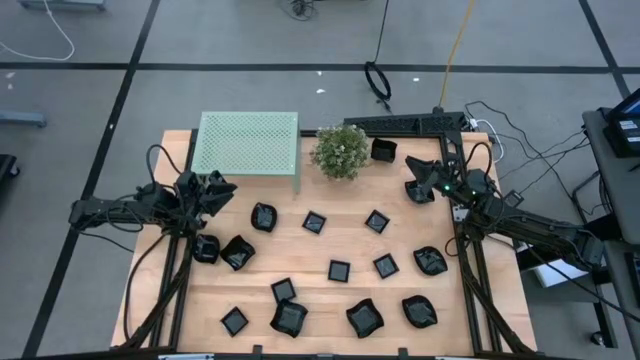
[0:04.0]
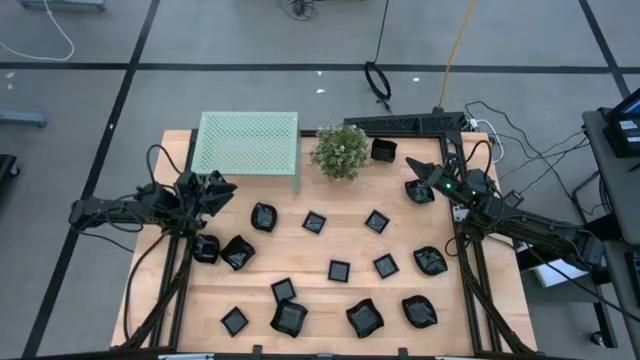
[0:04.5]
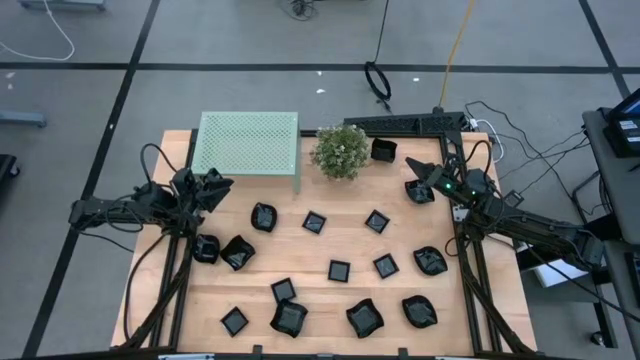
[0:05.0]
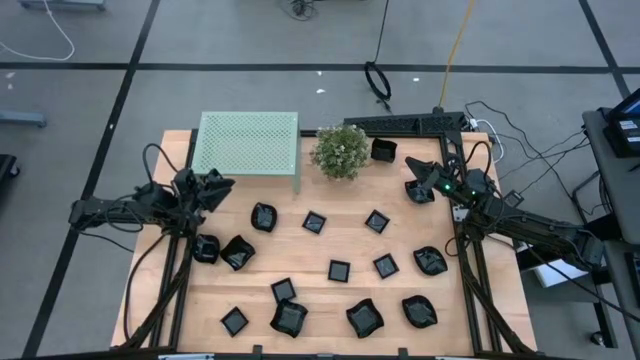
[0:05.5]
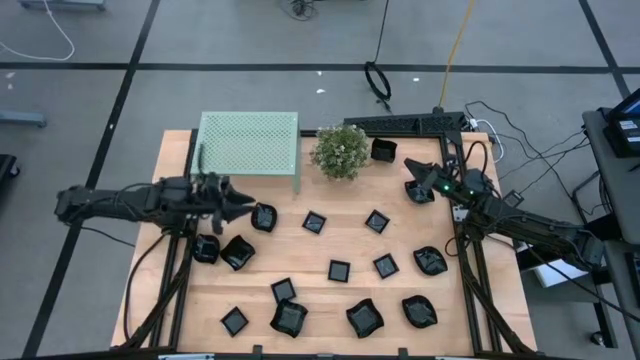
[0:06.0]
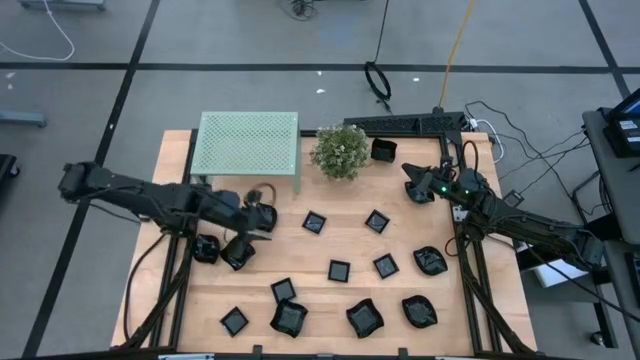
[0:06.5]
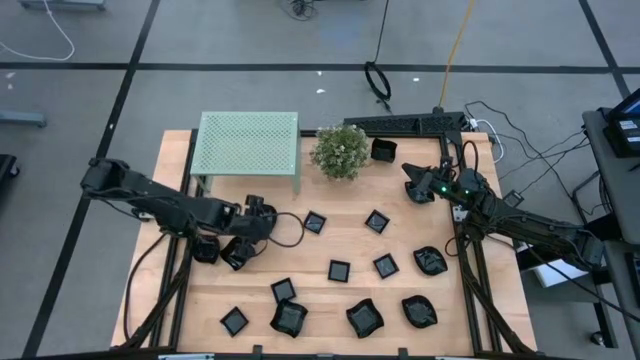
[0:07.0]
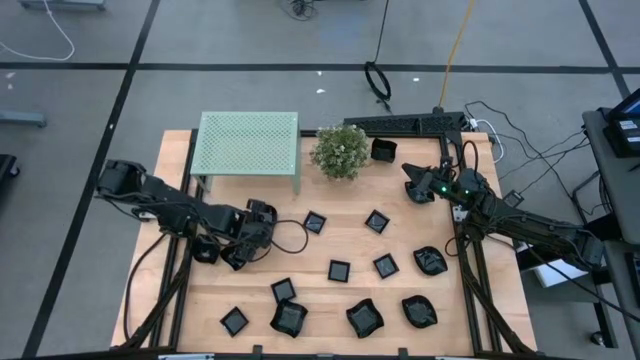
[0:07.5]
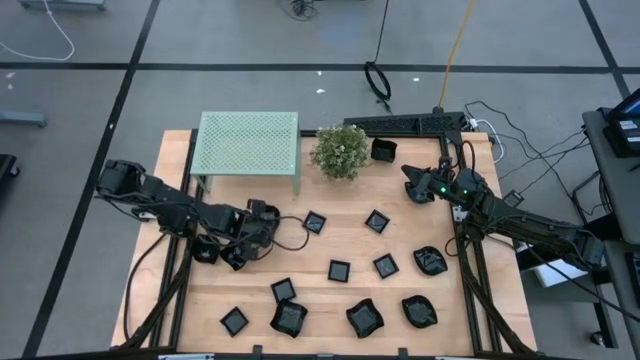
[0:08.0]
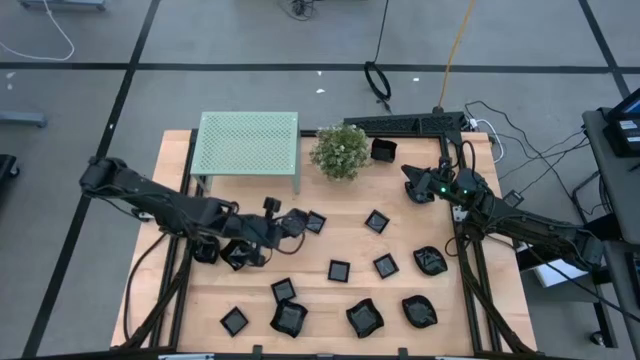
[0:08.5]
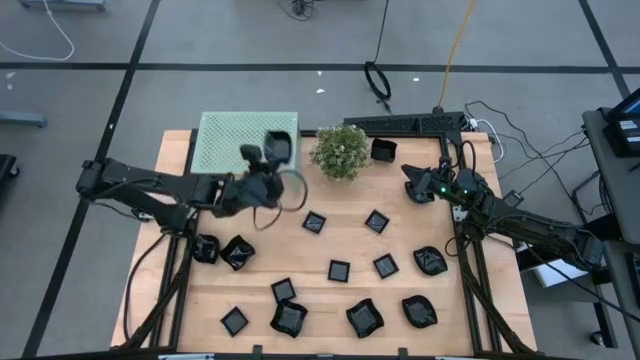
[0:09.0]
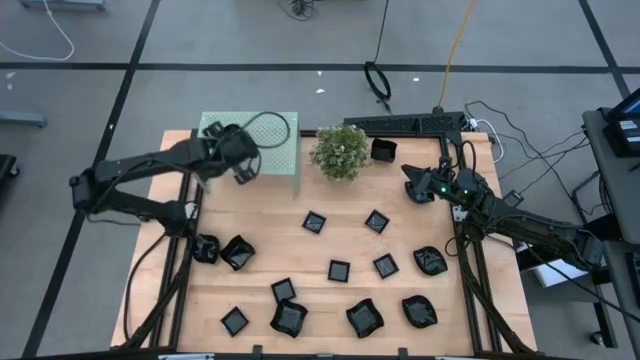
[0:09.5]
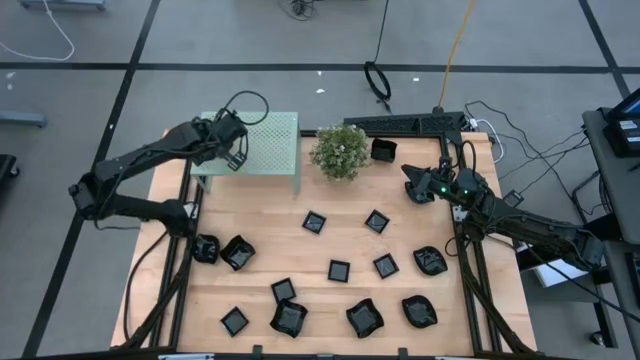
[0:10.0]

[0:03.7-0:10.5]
Task: Pick & Place Mini shaped plates
Put the leaf shape plate on the shelf

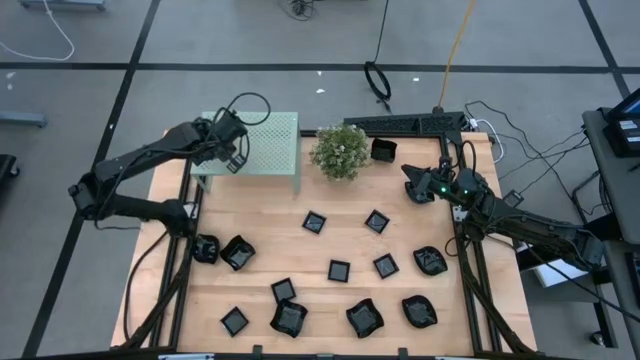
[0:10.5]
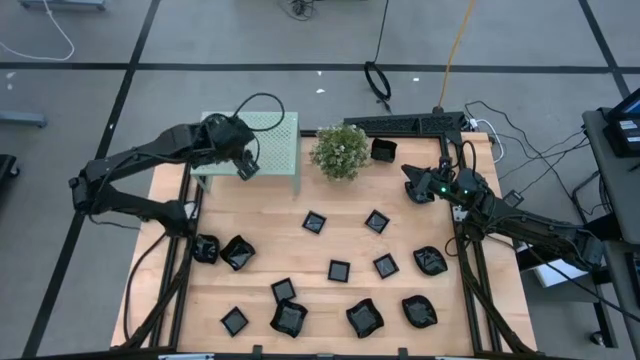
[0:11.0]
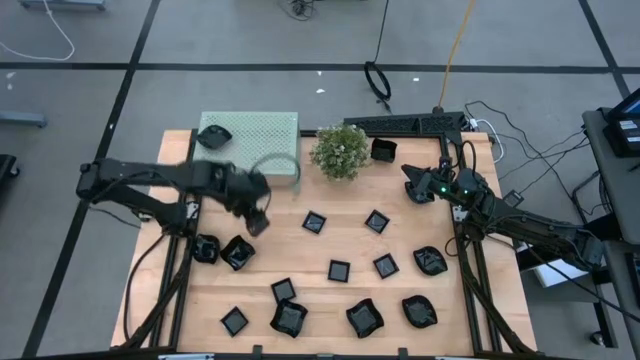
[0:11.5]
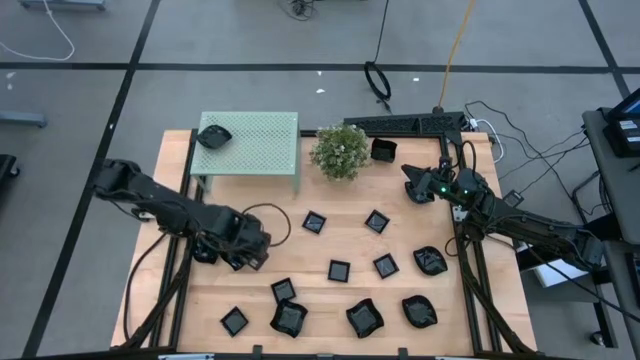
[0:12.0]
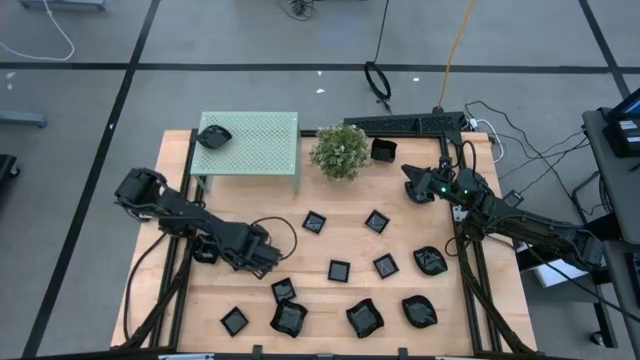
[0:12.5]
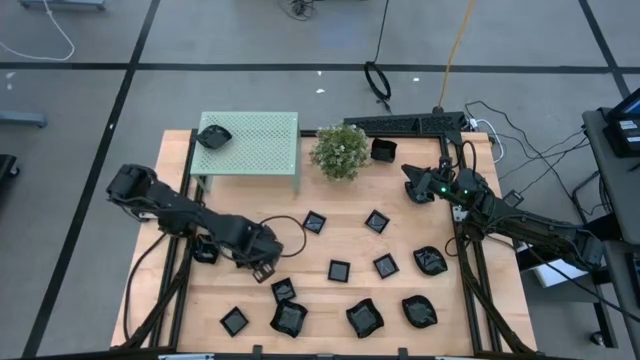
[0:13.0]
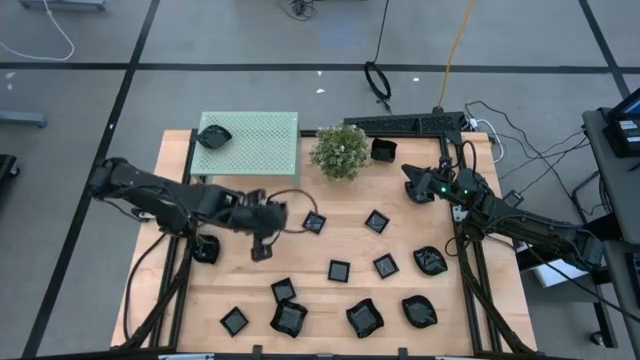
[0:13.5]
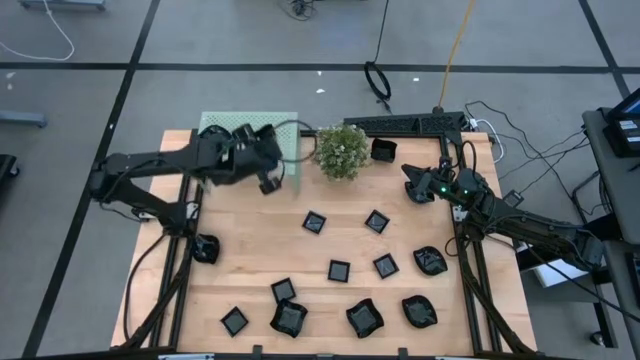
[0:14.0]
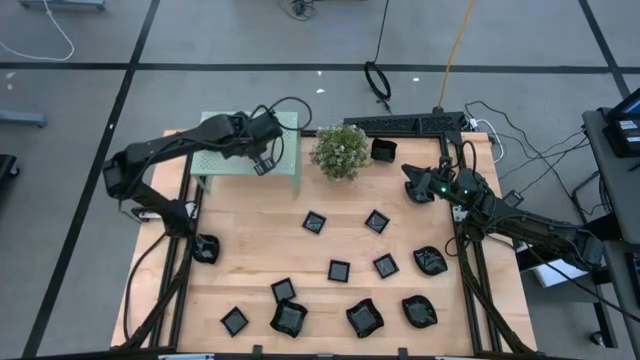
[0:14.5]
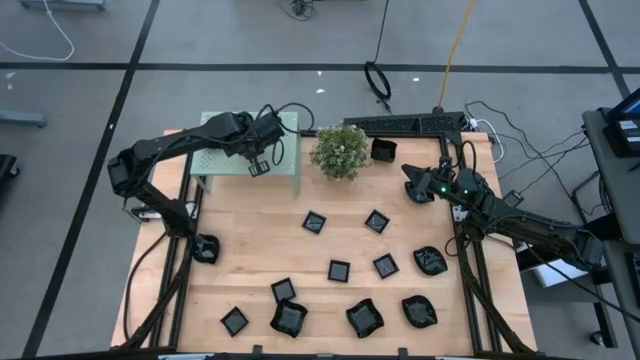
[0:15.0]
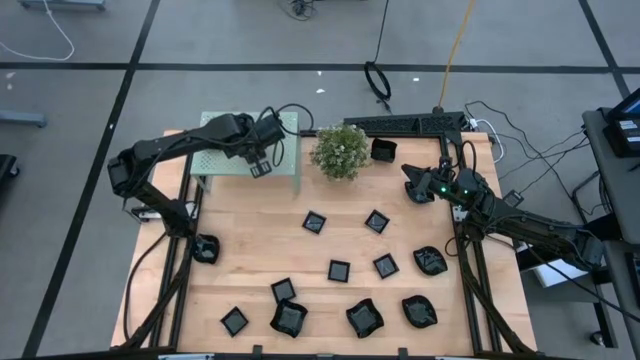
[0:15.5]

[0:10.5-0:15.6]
Put the distorted square plate on the shelf

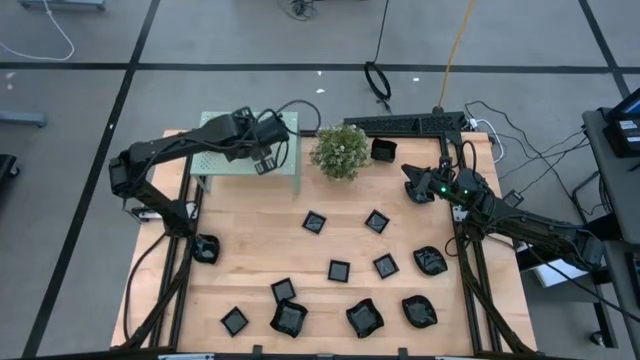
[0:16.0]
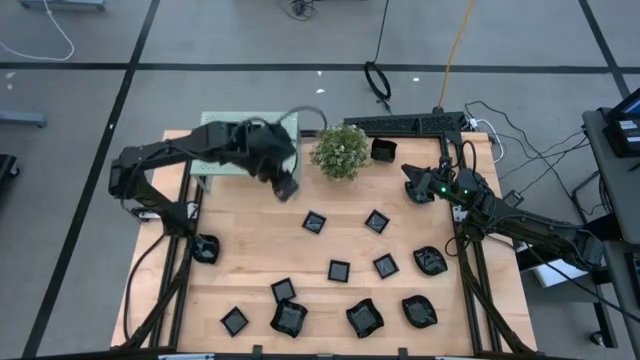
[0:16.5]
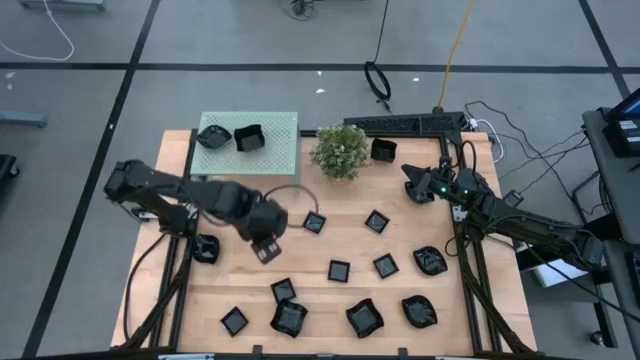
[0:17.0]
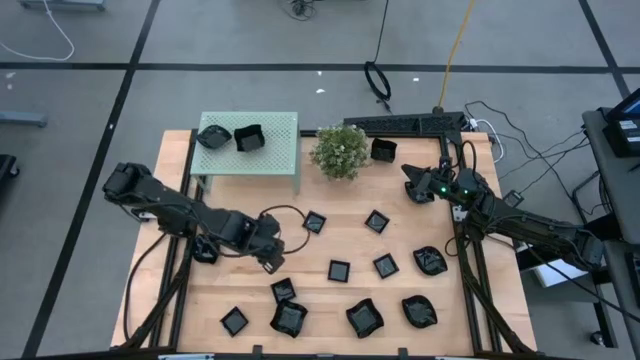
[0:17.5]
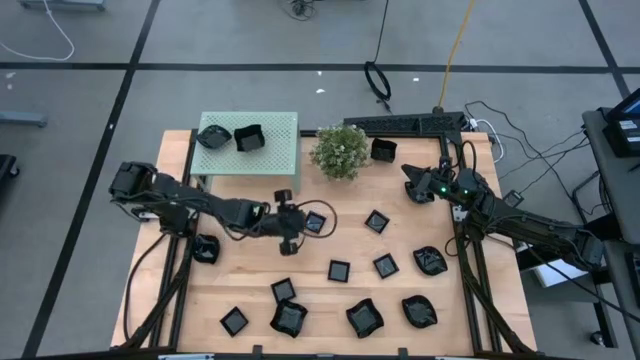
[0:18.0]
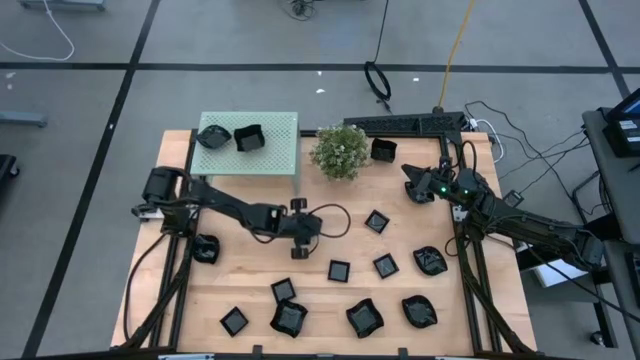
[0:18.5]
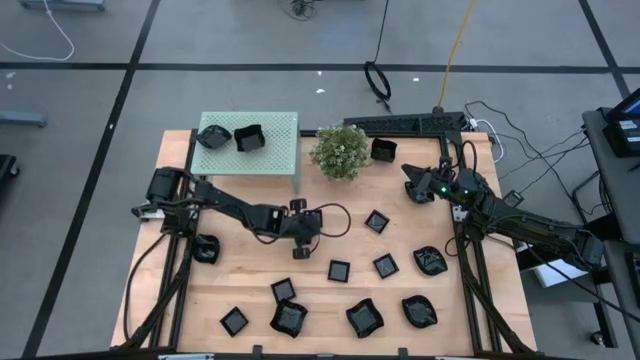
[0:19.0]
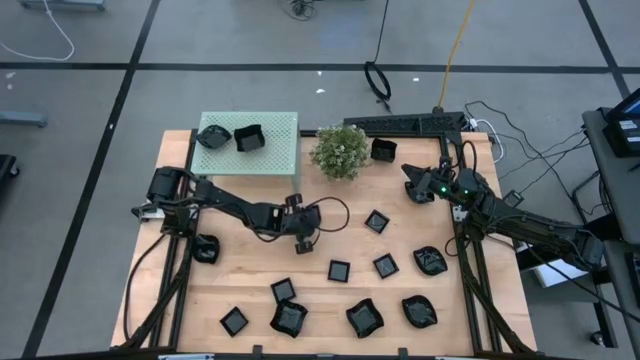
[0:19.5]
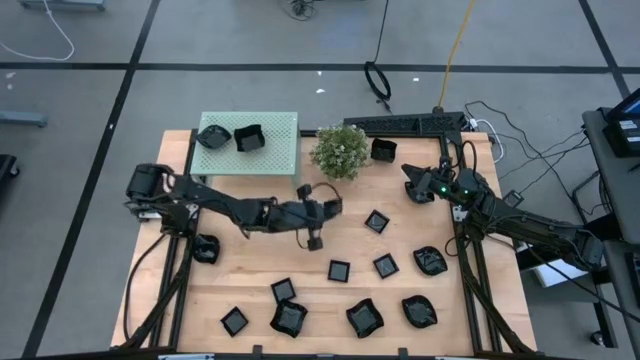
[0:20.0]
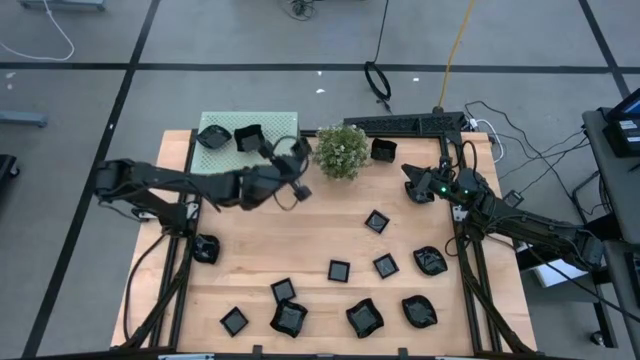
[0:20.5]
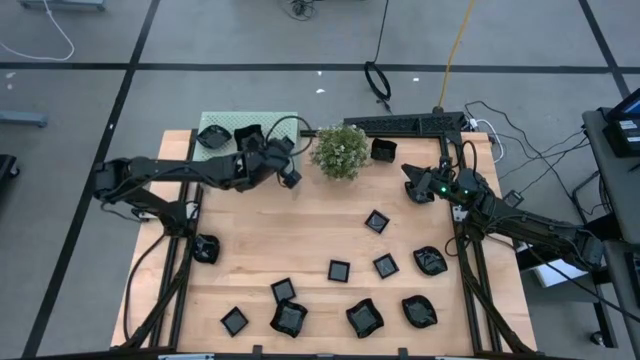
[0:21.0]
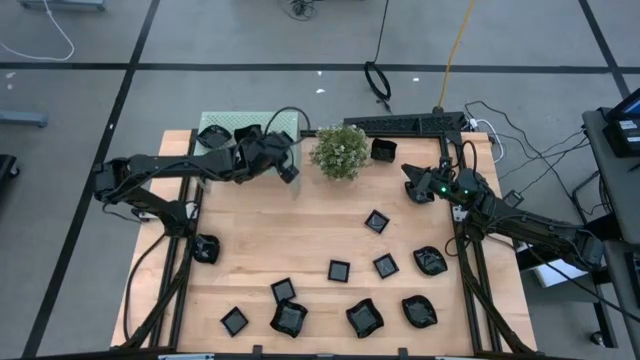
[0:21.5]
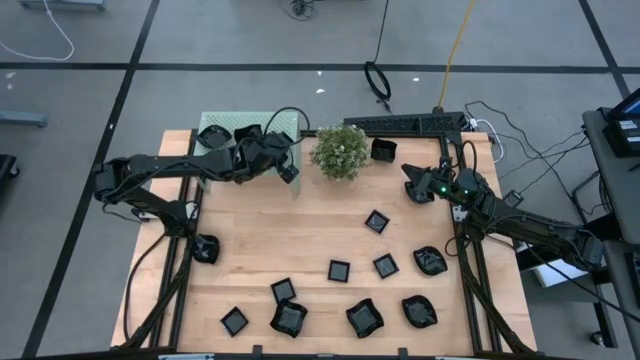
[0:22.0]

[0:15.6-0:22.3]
Put the square plate on the shelf

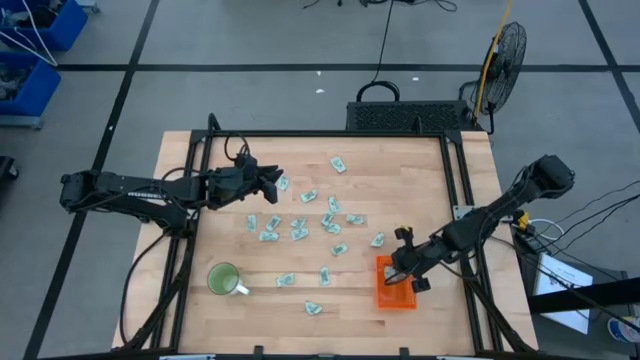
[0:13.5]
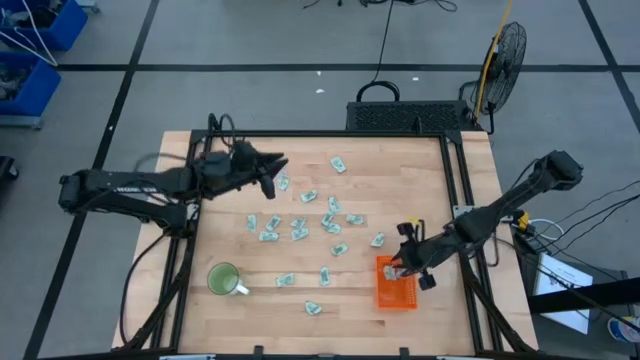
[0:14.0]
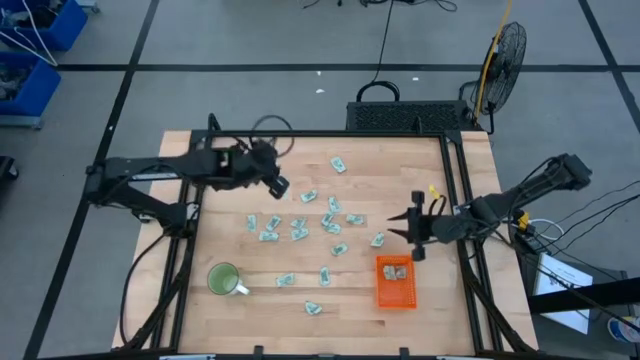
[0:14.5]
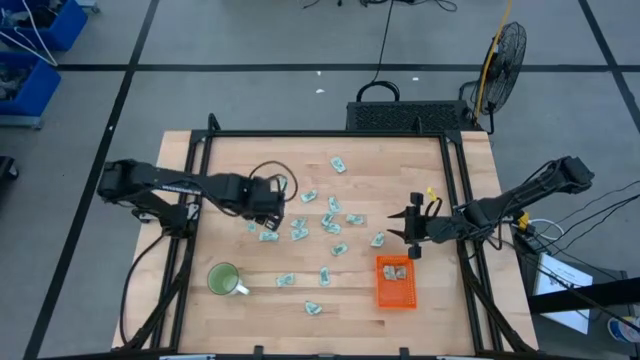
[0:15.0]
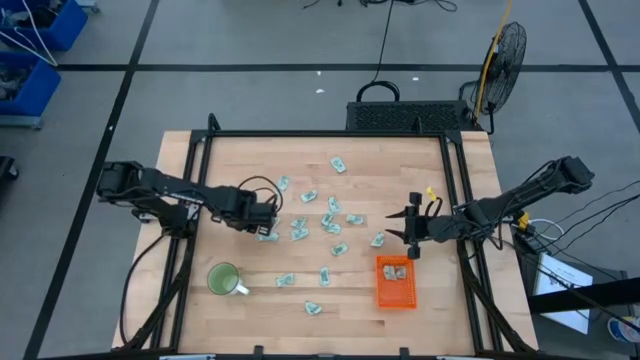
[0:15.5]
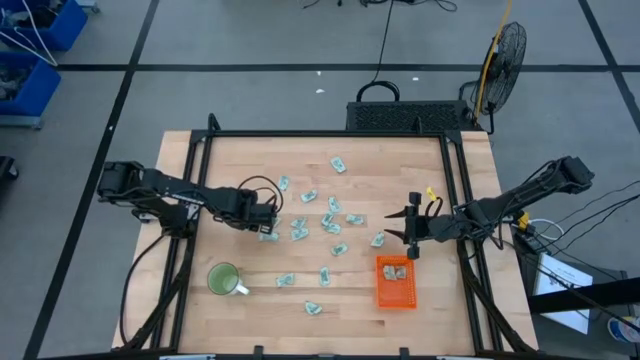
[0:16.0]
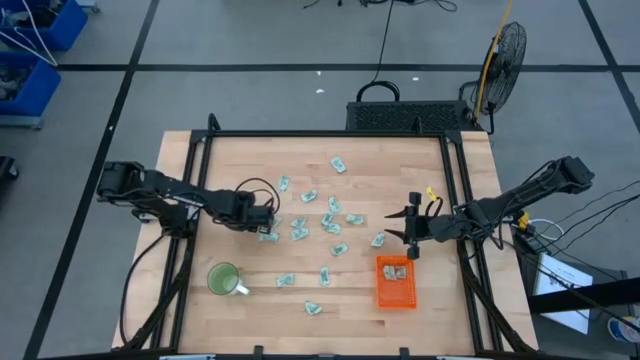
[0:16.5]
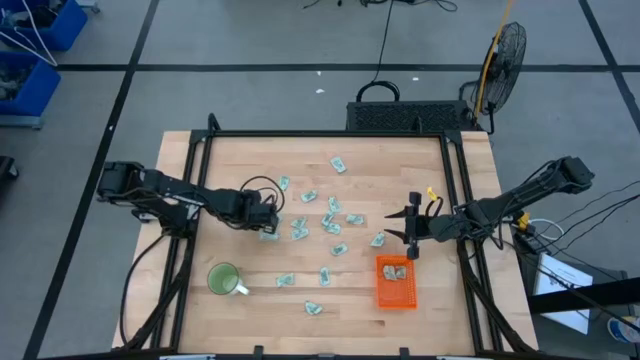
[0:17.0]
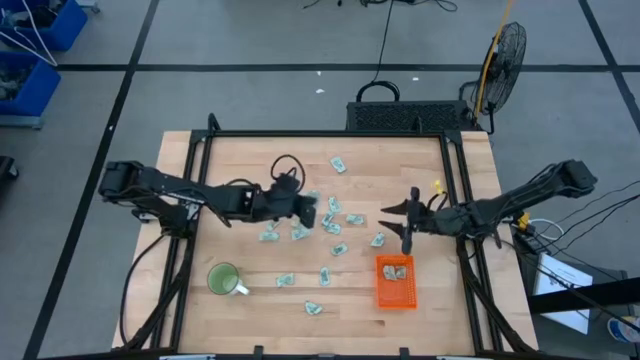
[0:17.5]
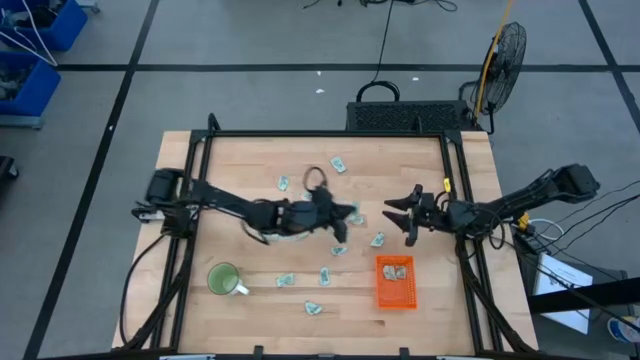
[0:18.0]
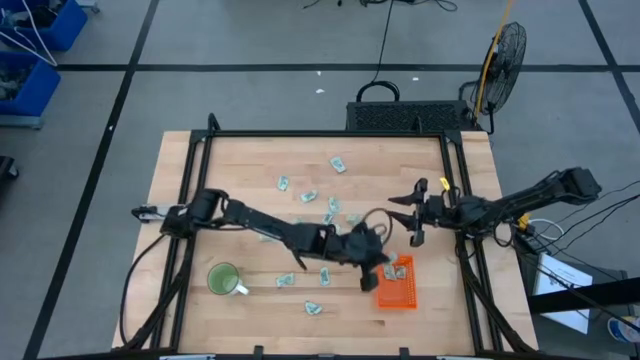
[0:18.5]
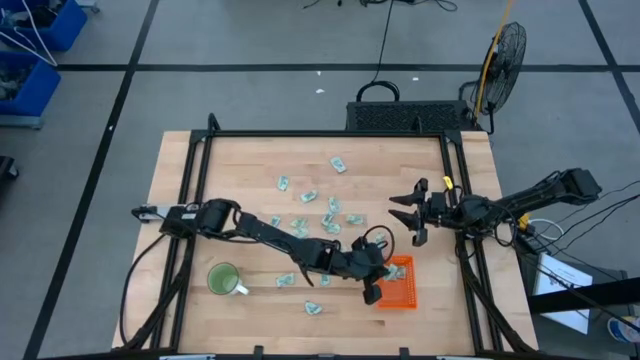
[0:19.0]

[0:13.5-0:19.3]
Task: Pick and place Stevia / Truvia into bins
Put the stevia packet into the orange basket
